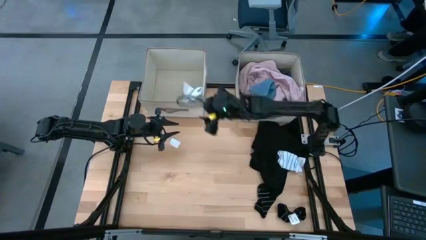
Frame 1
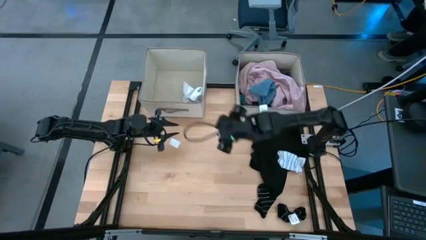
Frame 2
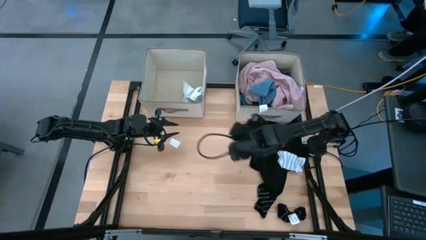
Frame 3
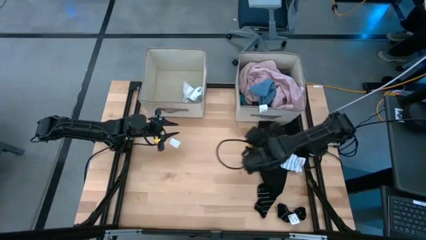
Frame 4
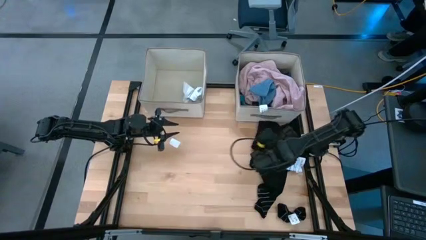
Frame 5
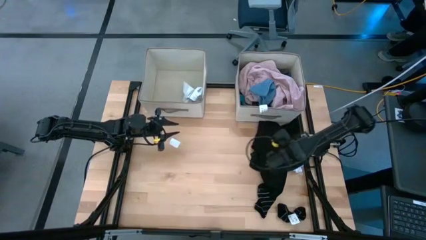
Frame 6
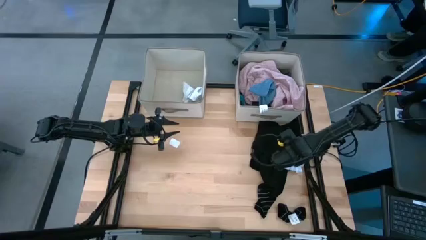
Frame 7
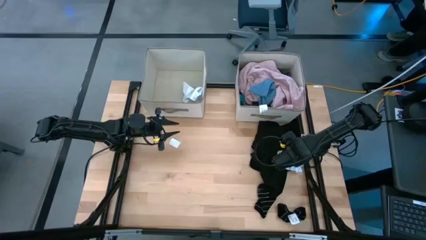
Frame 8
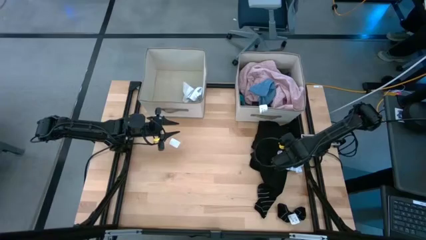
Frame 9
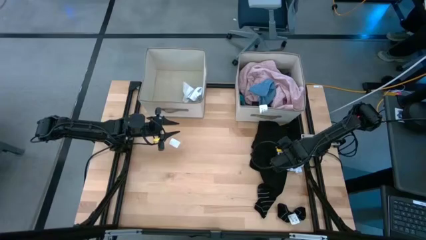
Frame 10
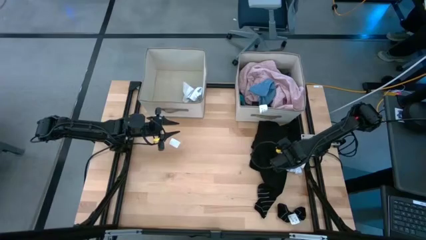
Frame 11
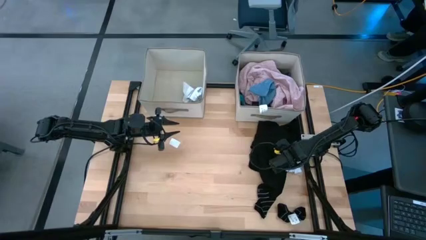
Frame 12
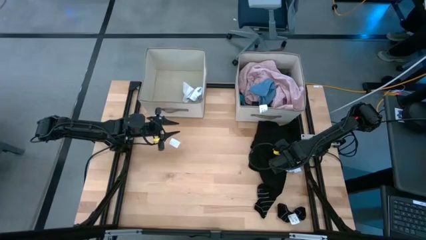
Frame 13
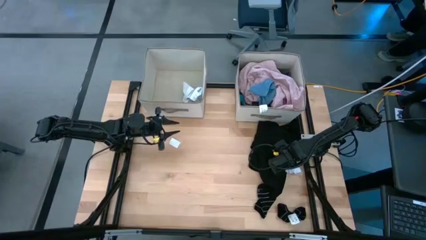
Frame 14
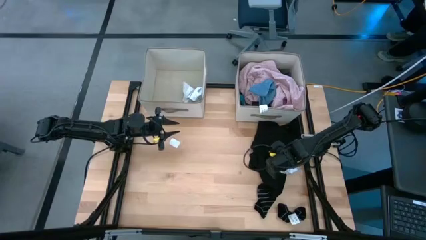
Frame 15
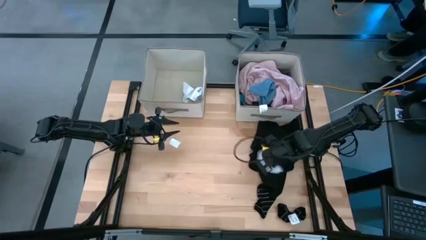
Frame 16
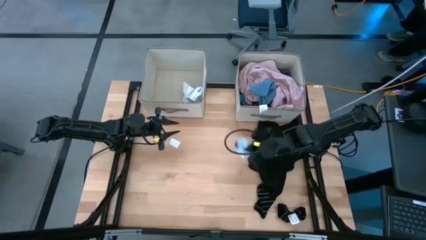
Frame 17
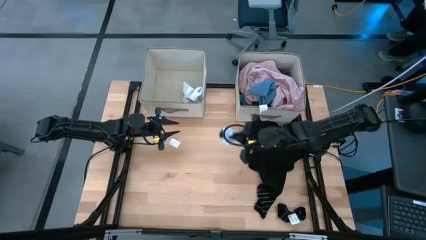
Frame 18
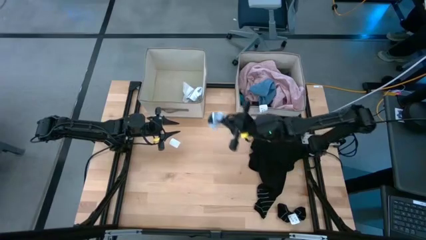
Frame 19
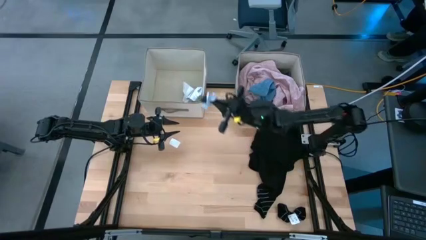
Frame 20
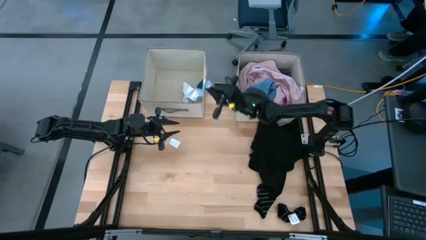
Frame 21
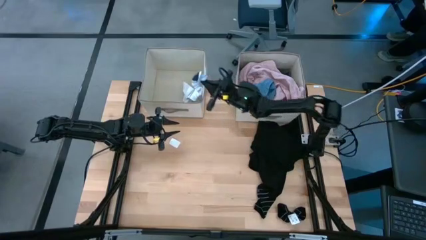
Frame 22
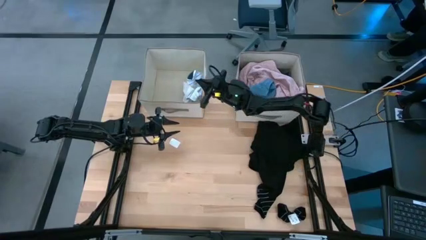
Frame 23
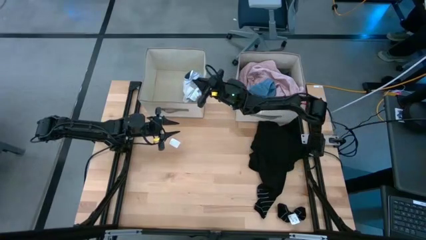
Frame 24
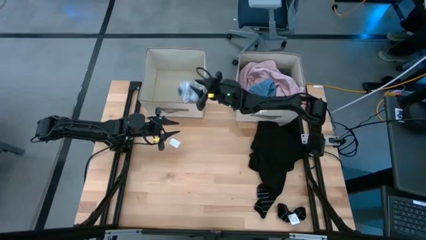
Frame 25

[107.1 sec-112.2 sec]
Task: Sort clothes
Put the white stripe sock into the left laundry organizer

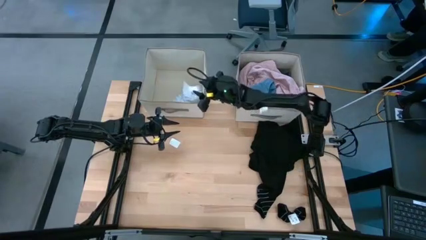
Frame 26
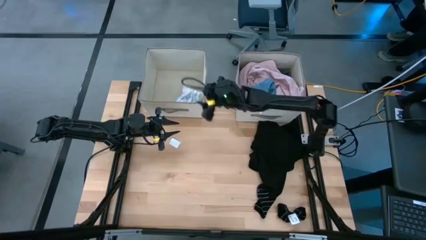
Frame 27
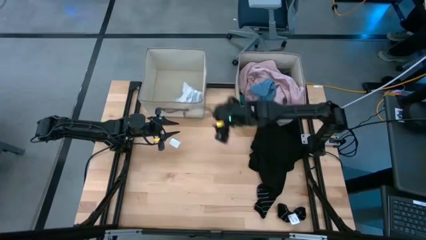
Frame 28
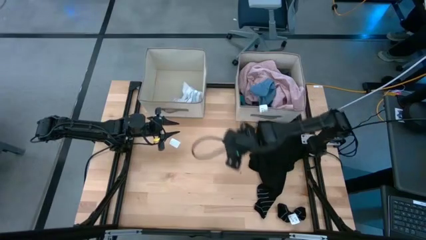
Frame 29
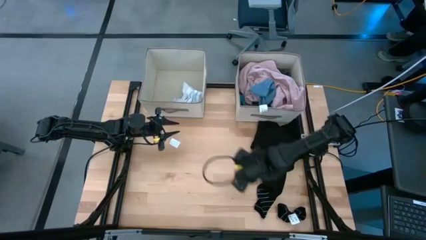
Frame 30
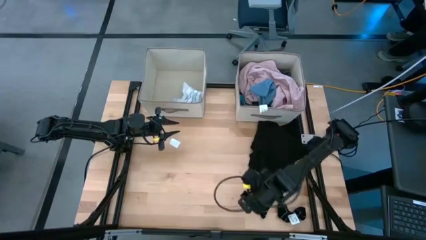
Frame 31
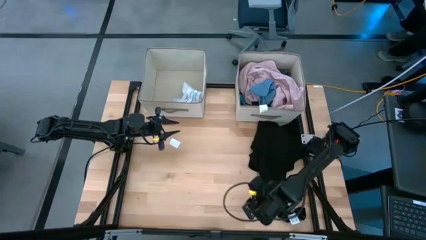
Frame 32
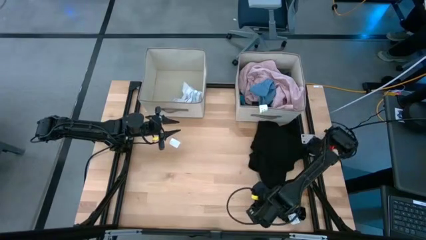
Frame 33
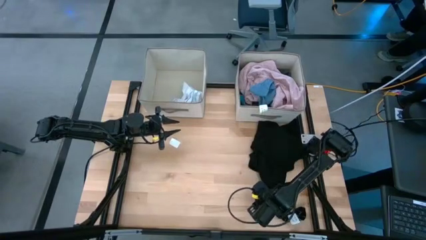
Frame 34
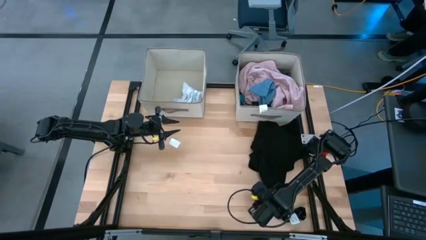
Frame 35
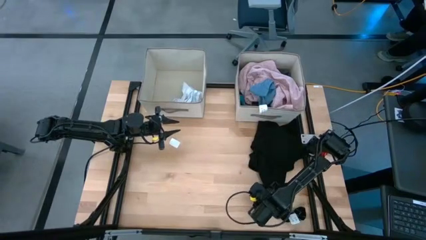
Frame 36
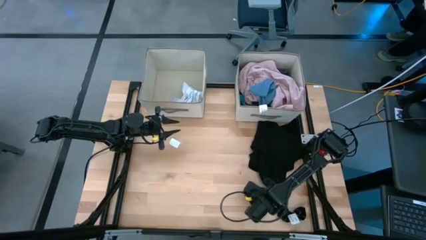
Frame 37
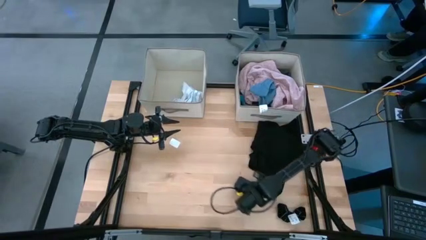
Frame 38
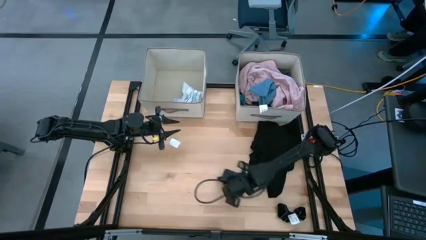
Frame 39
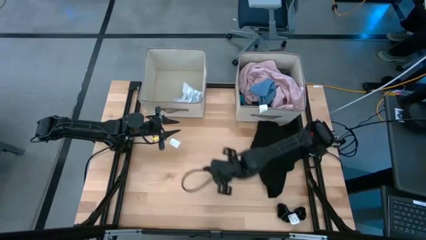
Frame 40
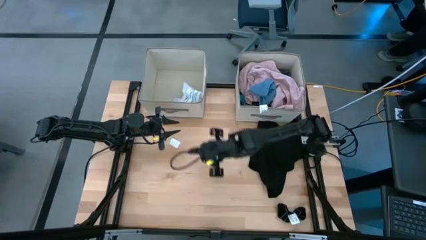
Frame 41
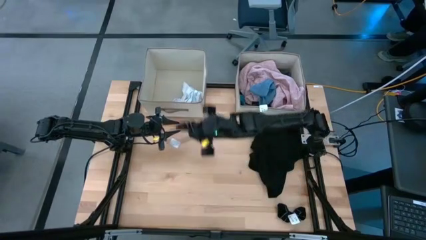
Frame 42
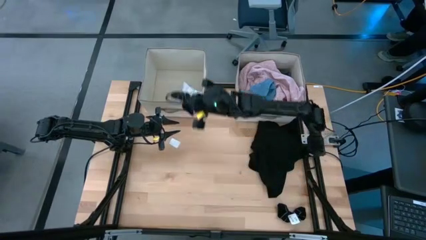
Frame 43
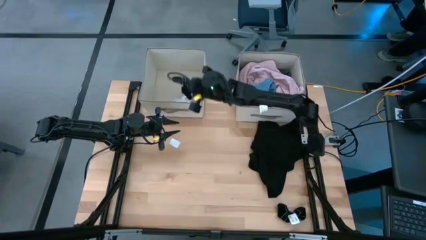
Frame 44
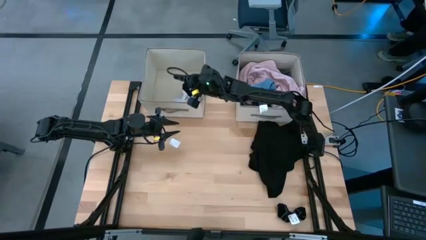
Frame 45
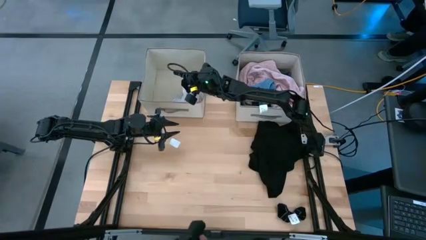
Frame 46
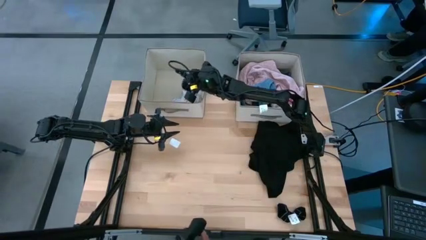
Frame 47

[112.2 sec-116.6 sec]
Put the left black stripe sock into the left laundry organizer

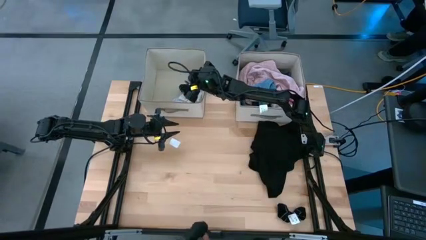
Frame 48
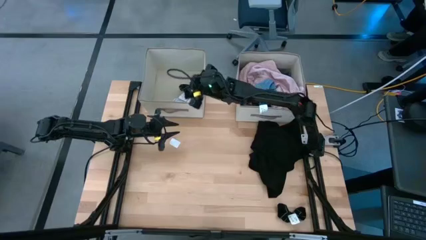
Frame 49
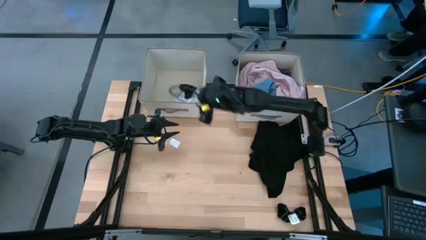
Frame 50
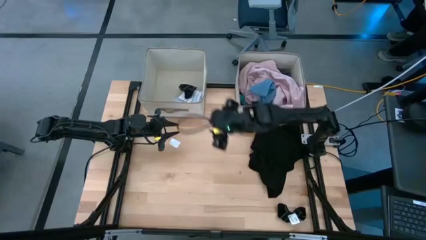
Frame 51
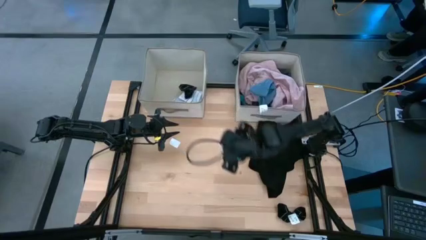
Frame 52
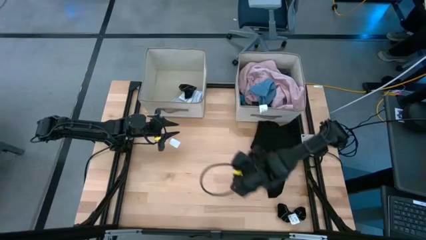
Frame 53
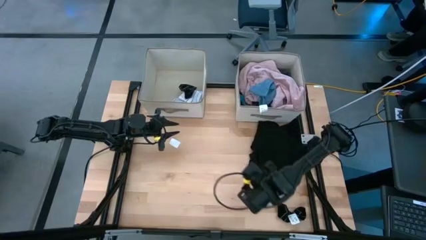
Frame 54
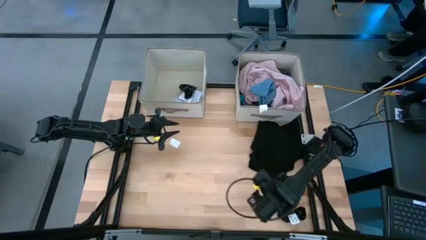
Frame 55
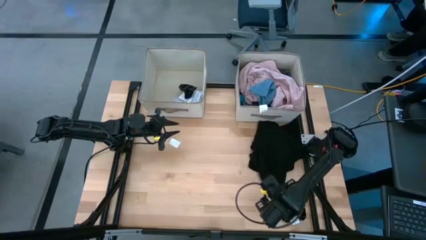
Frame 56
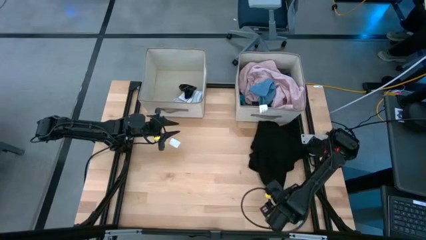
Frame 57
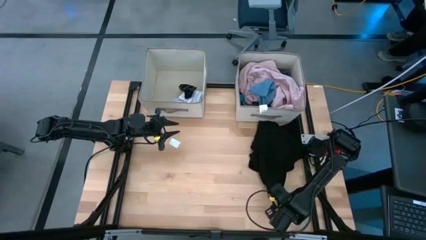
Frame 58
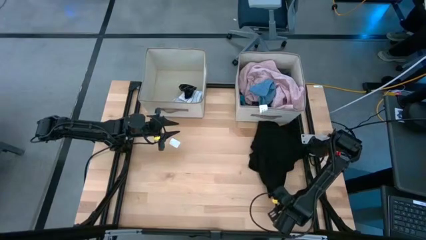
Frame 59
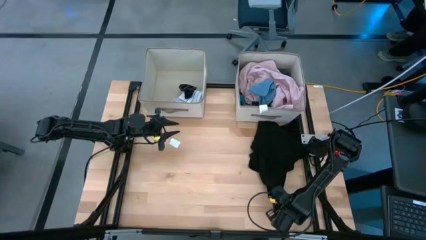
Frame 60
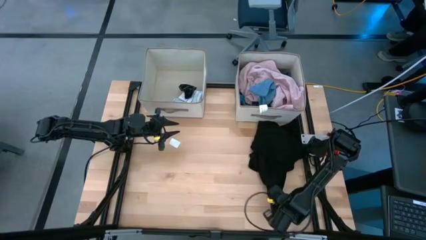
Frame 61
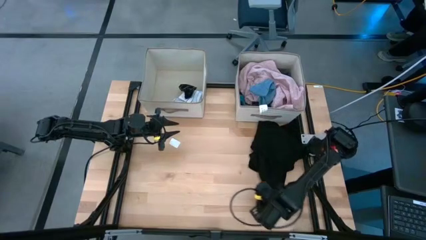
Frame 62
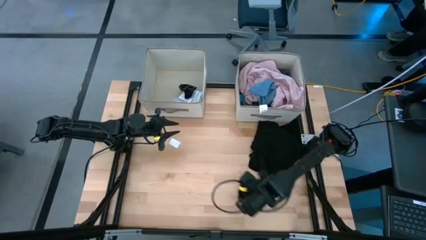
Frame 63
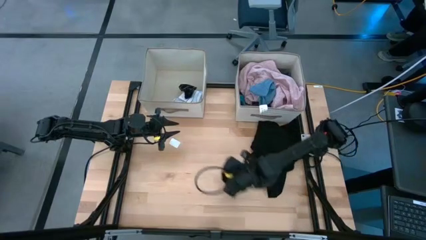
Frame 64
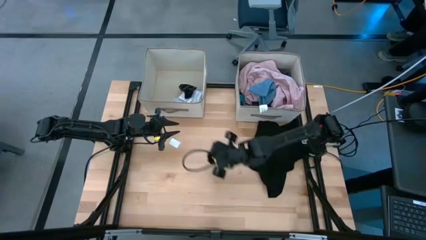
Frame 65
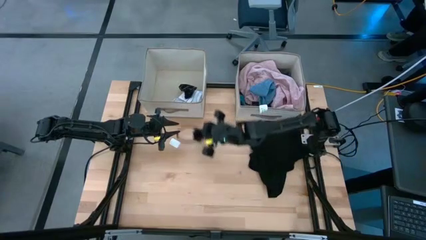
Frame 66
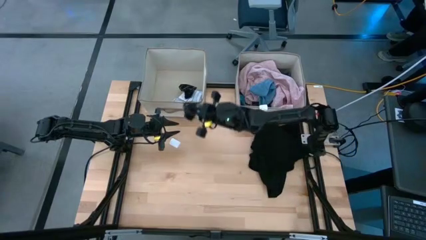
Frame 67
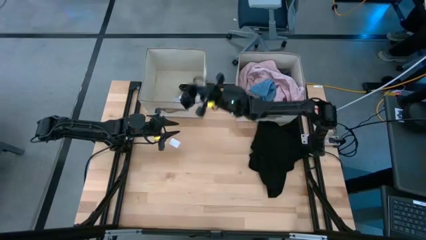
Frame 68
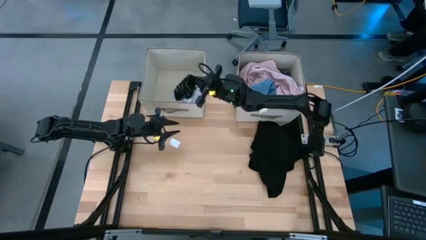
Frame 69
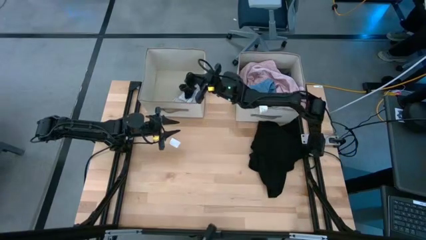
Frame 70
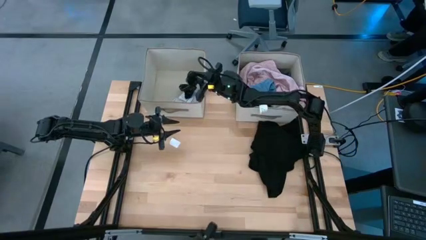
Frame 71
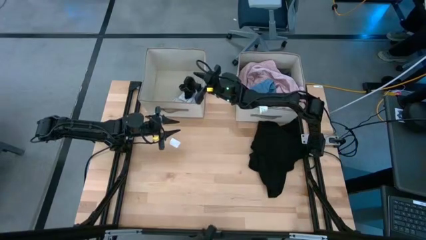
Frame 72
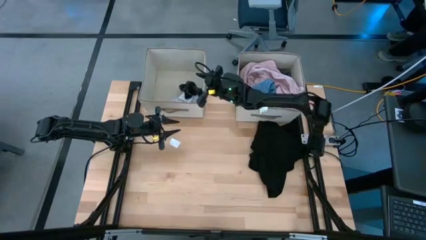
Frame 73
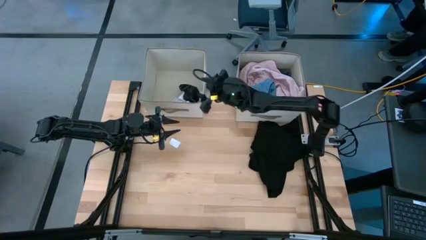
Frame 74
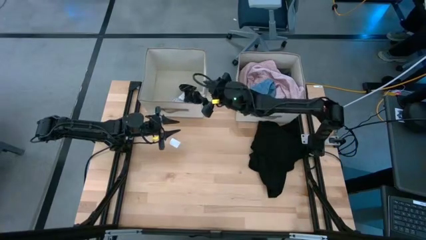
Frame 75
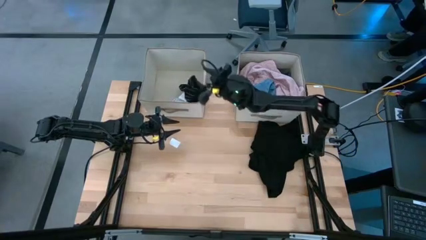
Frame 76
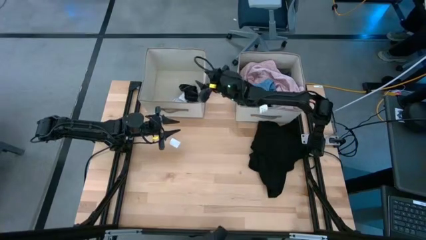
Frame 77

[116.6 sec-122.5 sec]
Put the black stripe sock into the left laundry organizer
